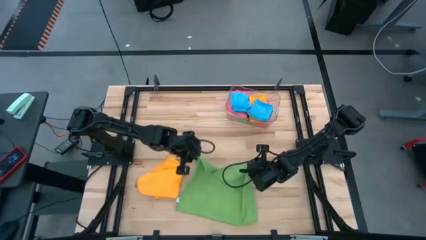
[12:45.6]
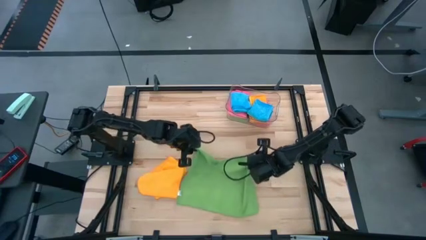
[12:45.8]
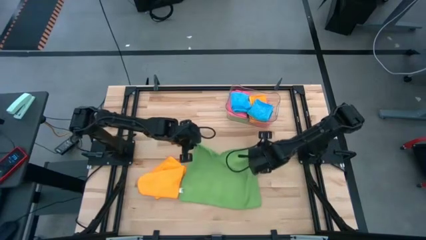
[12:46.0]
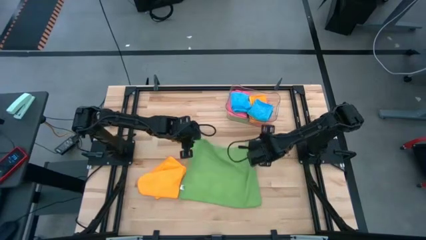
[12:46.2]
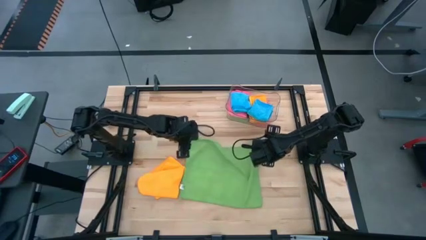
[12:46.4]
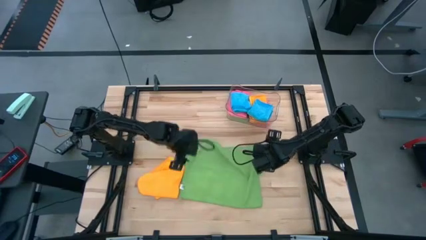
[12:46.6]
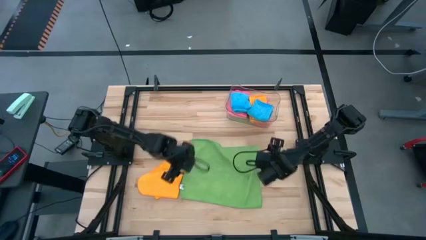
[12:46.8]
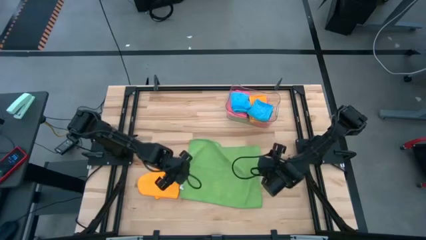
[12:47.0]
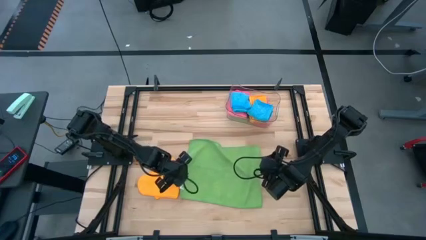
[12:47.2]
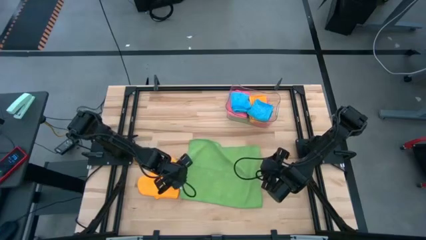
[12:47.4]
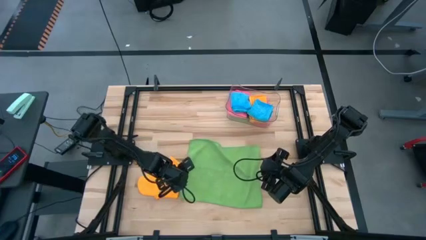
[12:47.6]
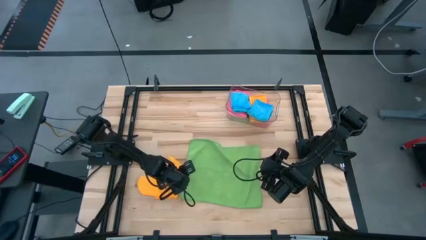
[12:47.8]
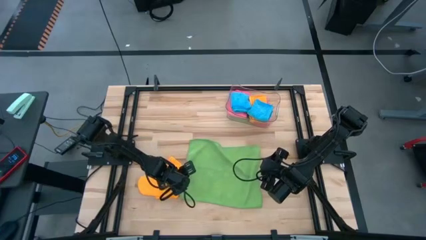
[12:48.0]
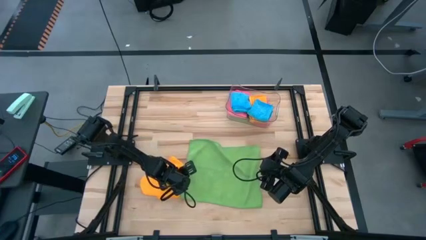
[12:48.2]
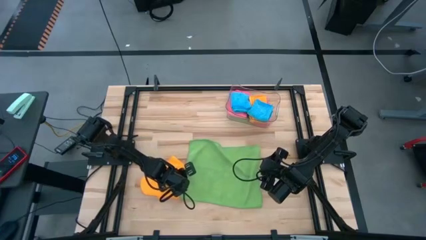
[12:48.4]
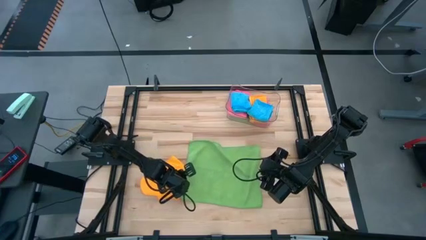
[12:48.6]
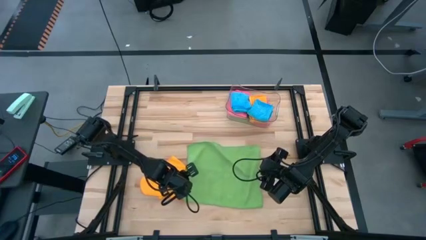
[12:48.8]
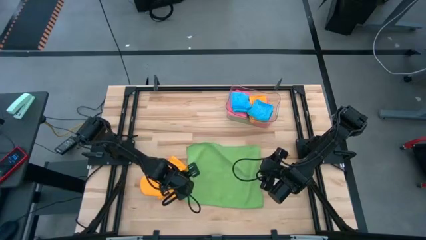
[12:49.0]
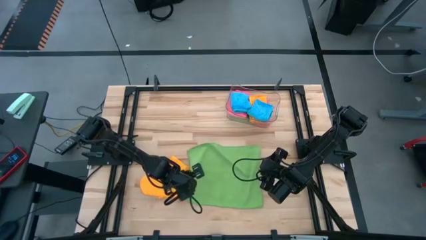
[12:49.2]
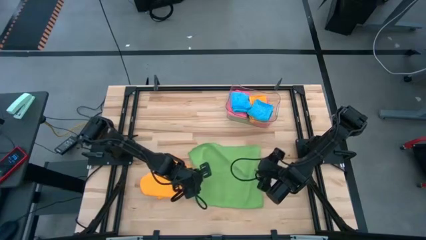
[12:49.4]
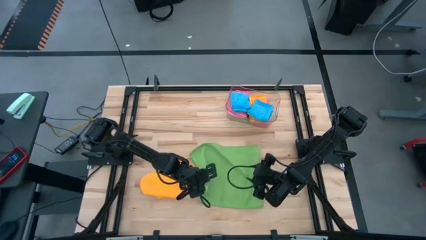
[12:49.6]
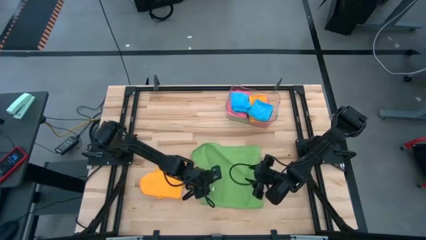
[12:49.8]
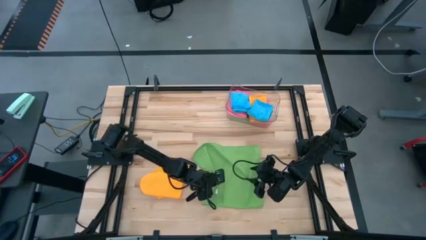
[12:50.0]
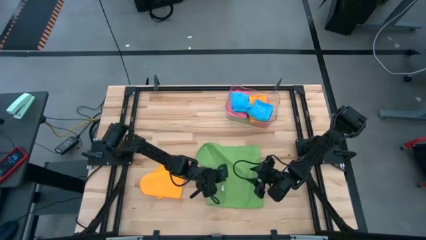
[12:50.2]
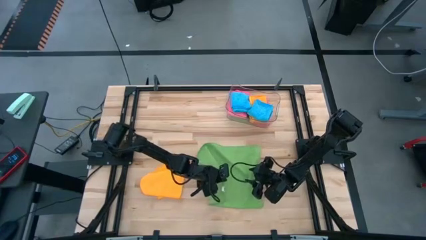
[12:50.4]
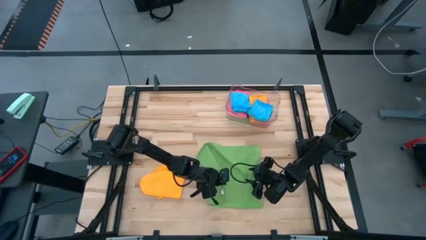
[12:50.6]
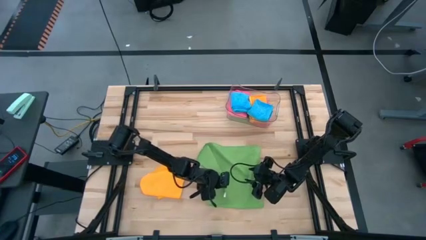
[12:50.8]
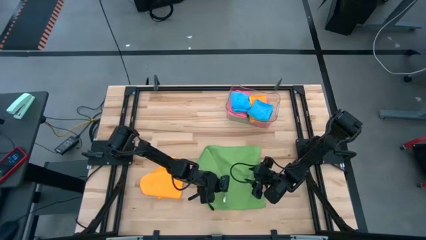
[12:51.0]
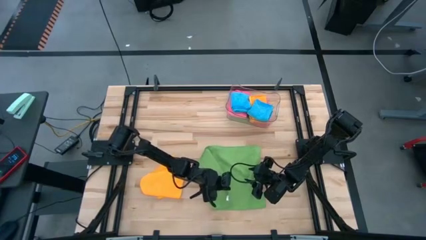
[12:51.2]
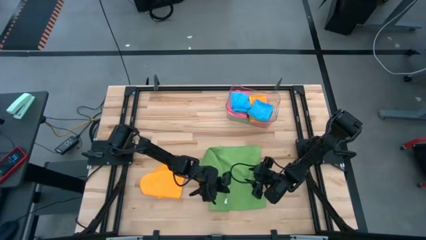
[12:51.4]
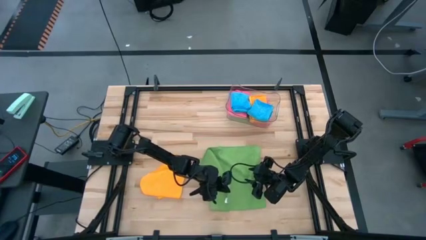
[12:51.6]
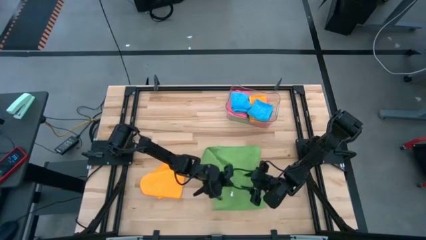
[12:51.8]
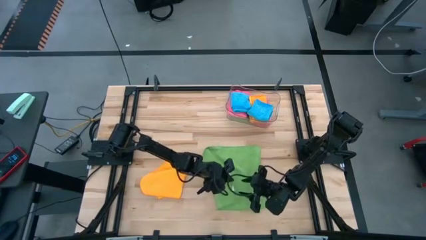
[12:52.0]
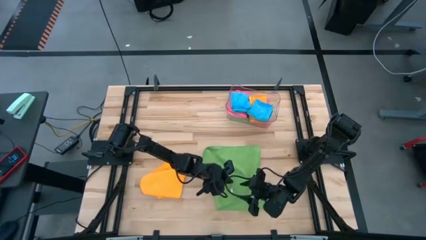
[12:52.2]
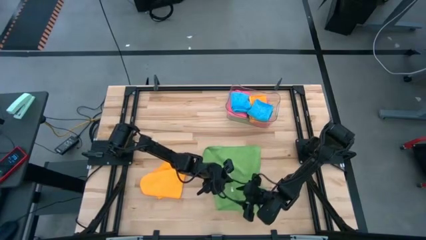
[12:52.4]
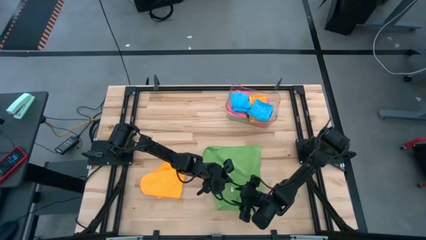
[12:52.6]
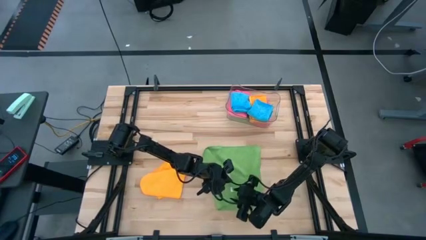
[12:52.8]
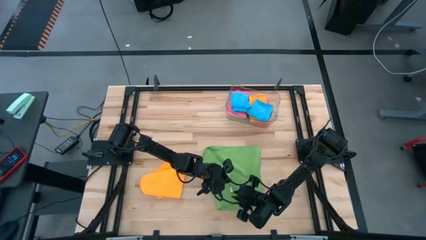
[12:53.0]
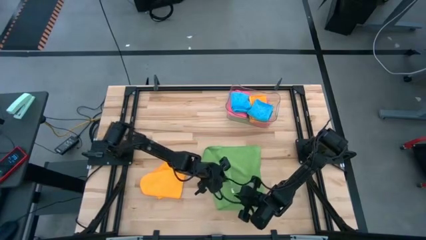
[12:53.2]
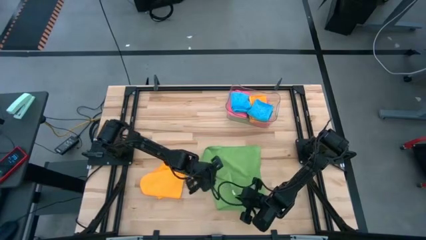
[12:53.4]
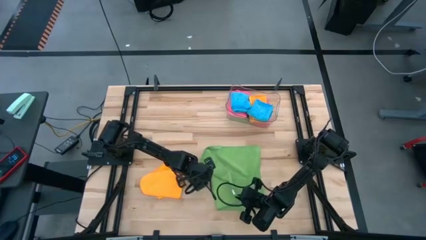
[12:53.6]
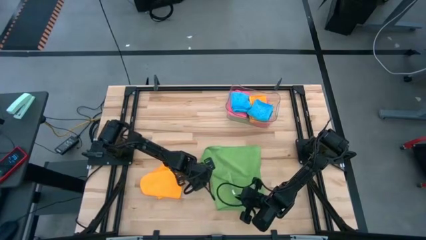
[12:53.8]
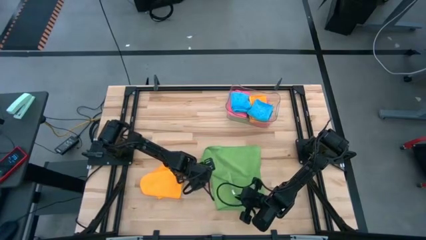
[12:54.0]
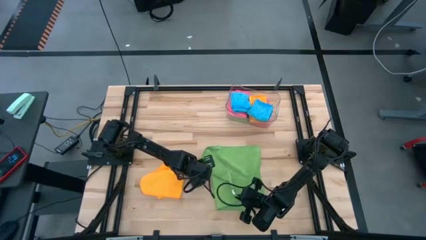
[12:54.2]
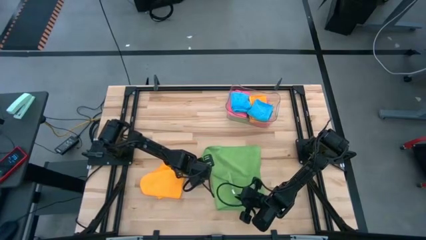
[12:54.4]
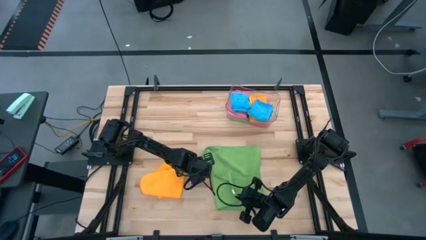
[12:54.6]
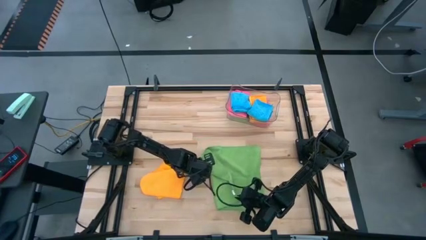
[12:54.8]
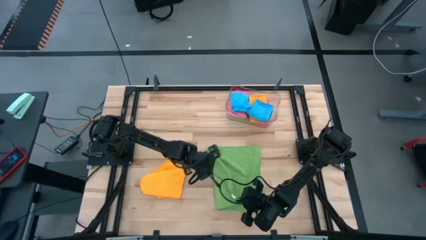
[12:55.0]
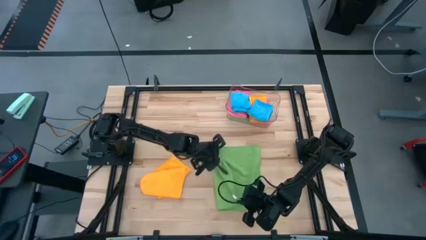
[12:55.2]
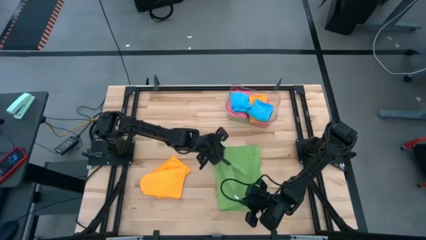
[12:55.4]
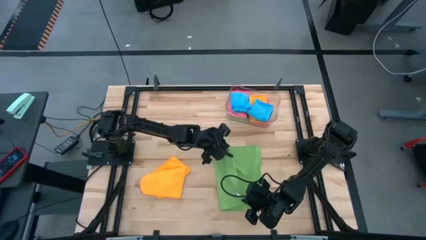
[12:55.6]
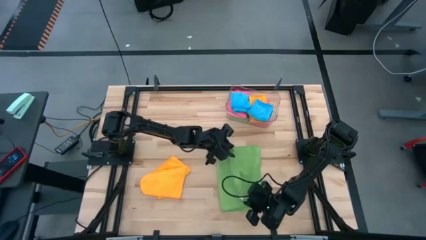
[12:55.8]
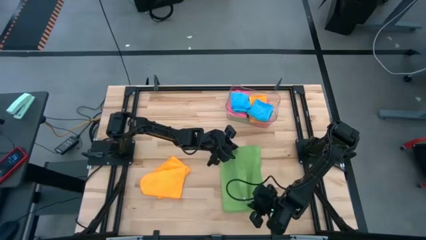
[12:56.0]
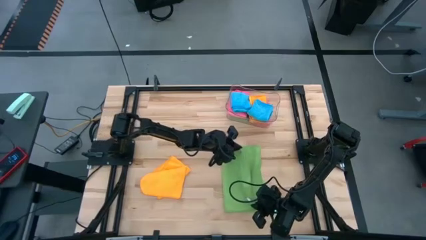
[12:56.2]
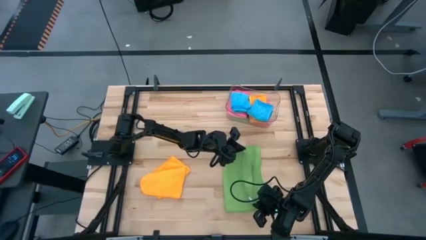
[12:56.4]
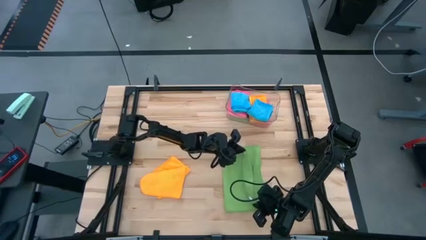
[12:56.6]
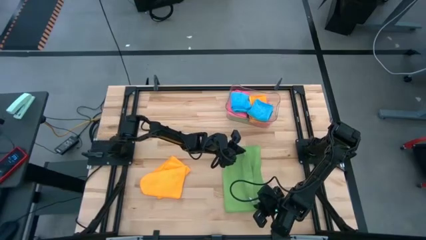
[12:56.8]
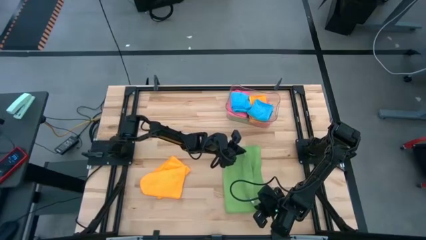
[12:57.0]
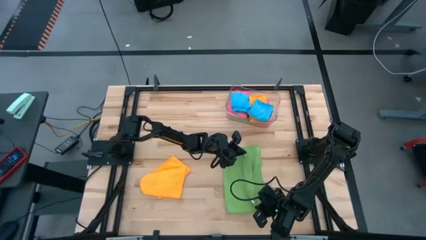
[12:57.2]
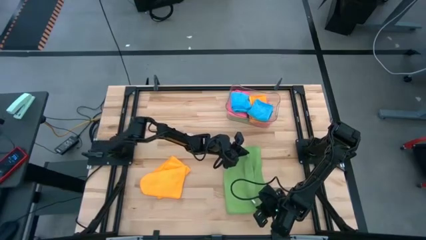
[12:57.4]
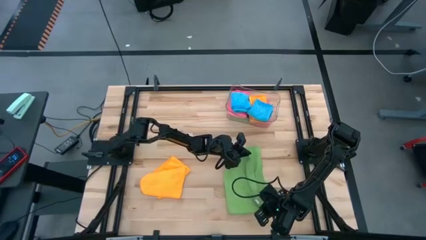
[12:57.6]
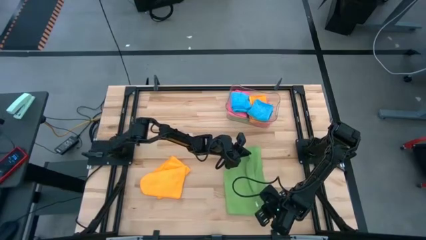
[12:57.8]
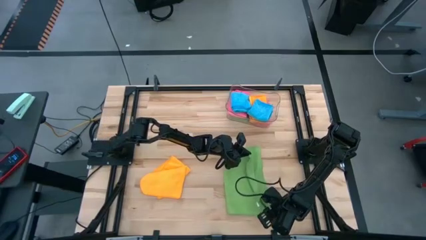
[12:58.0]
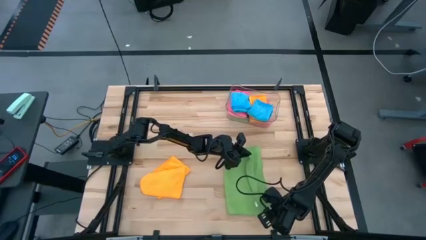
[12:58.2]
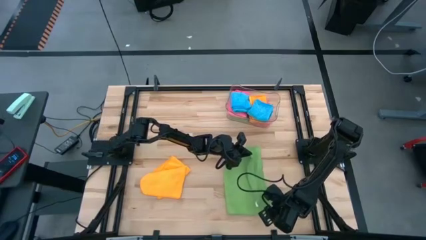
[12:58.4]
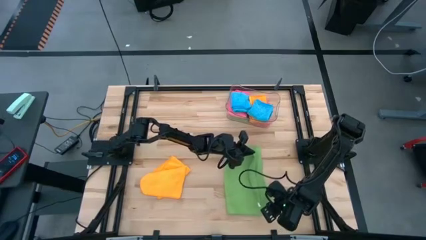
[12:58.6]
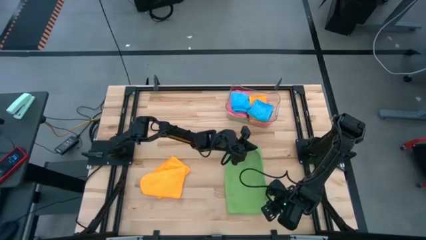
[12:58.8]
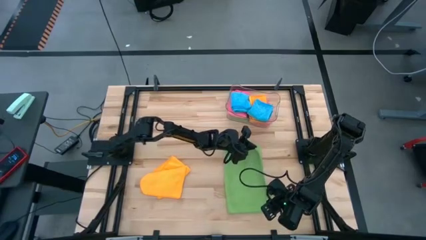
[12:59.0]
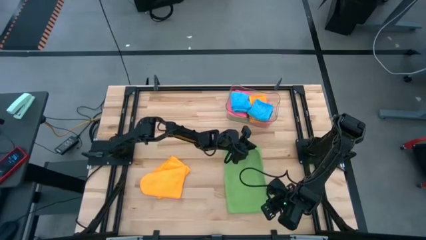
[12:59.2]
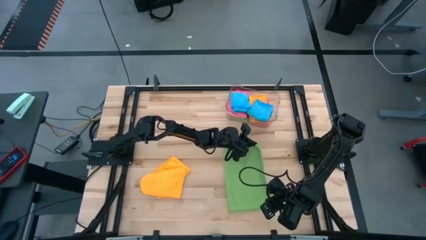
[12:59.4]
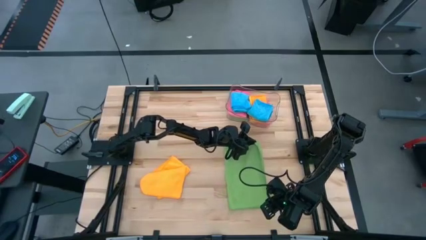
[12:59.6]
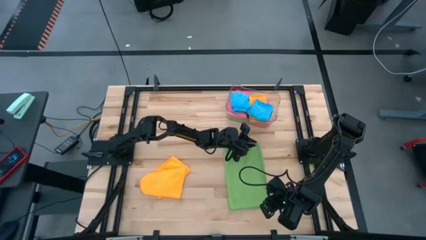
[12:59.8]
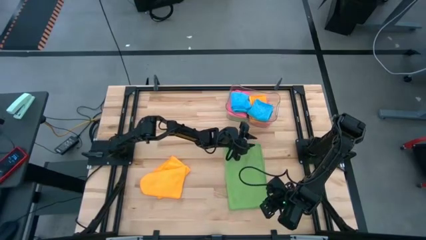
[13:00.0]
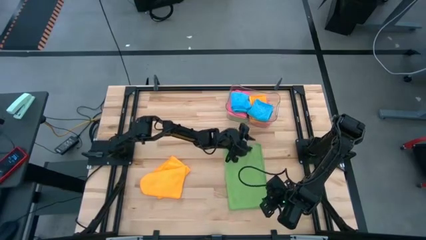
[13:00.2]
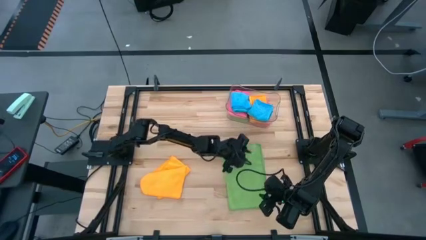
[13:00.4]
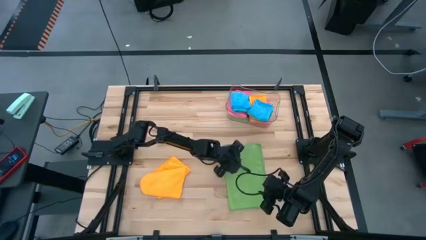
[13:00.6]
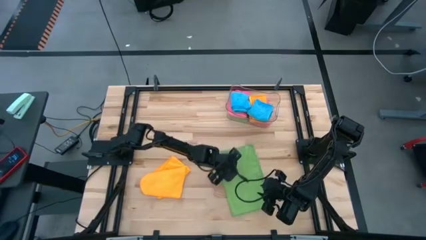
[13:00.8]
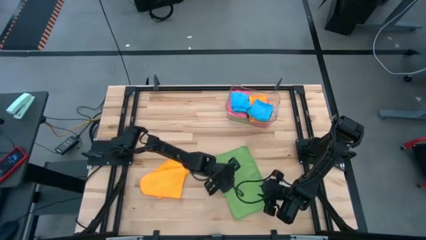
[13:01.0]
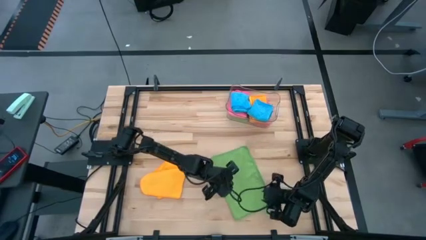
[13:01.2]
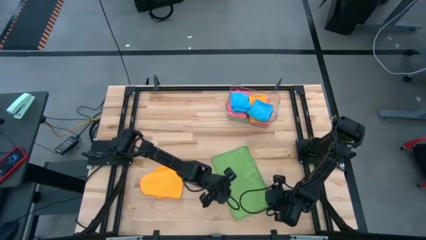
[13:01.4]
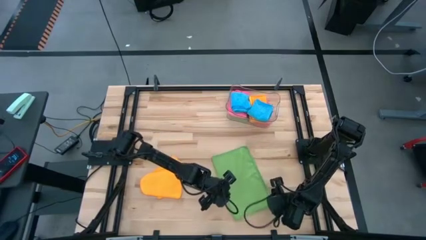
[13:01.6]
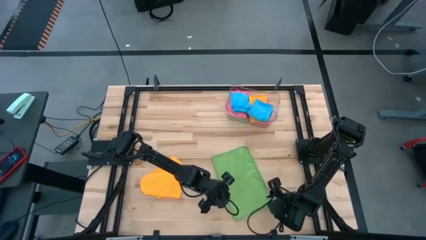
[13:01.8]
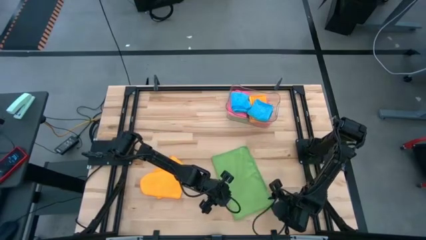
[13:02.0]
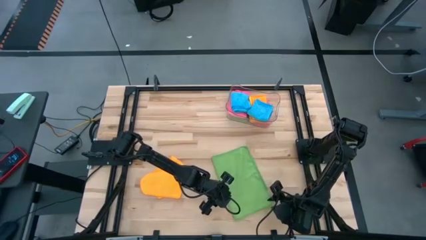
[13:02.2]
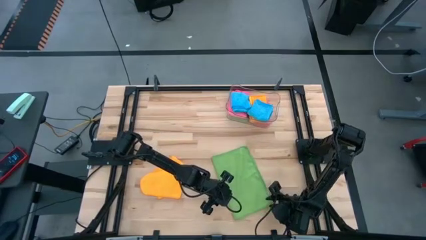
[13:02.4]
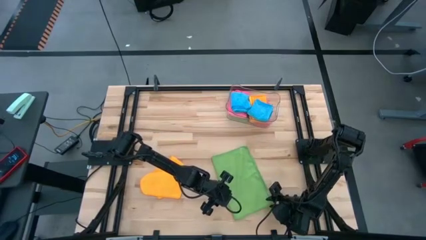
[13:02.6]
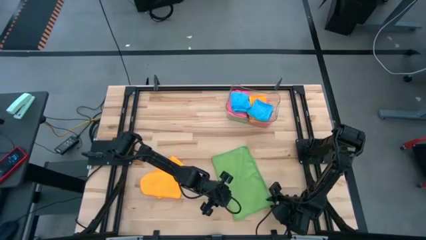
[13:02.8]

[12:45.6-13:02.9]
Task: Fold microfiber towels
Fold the green towel
